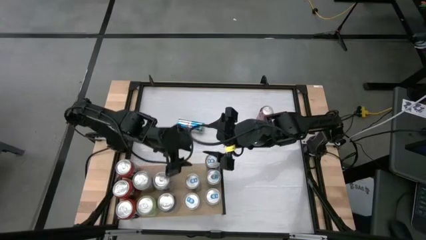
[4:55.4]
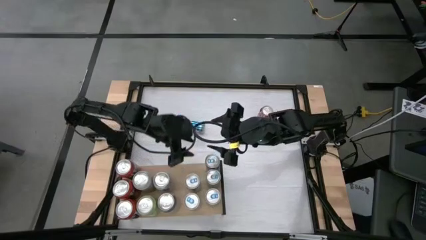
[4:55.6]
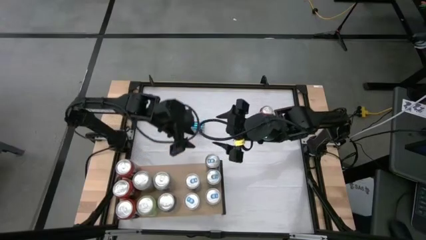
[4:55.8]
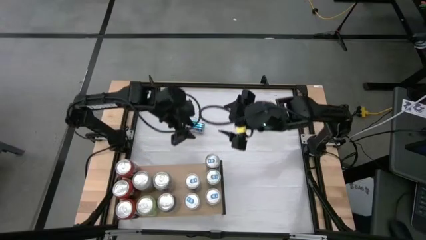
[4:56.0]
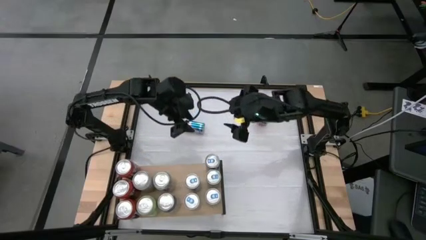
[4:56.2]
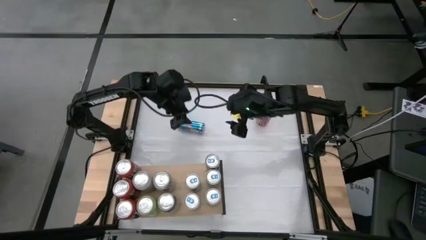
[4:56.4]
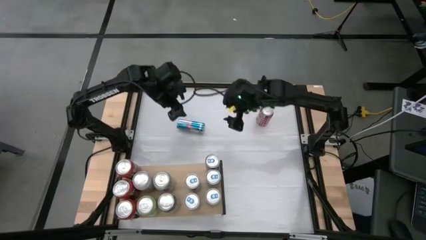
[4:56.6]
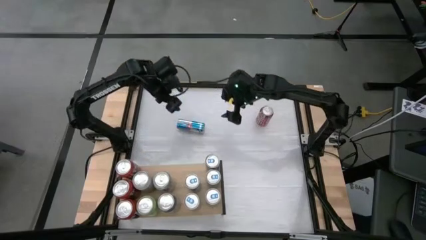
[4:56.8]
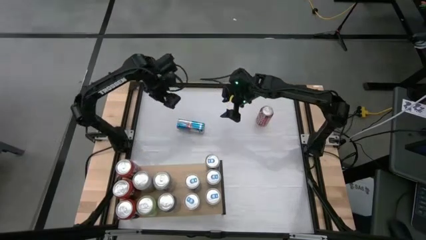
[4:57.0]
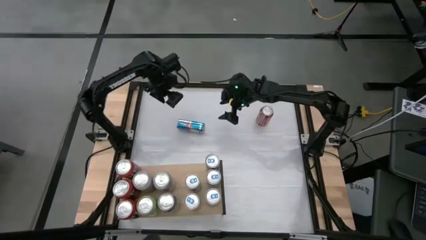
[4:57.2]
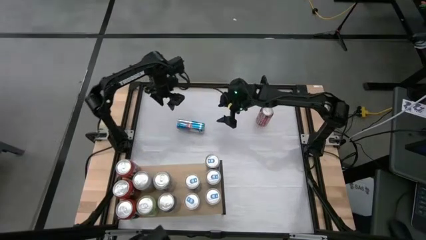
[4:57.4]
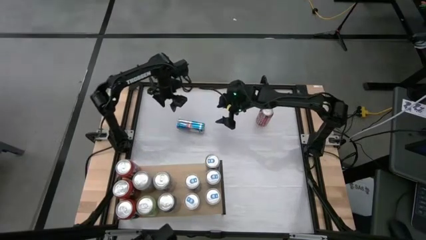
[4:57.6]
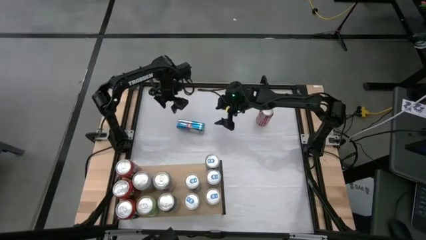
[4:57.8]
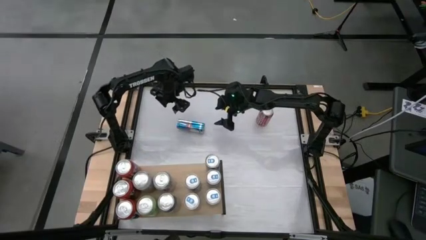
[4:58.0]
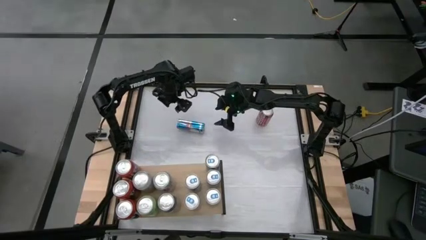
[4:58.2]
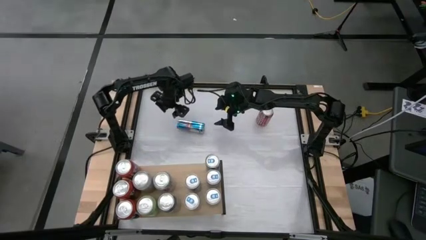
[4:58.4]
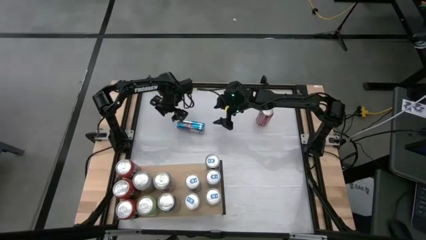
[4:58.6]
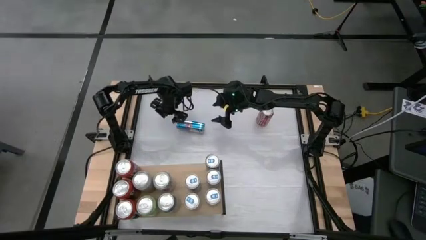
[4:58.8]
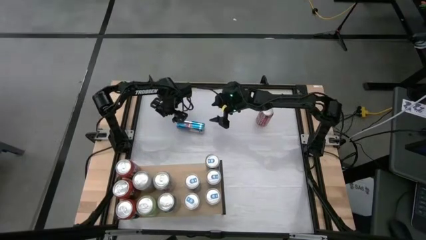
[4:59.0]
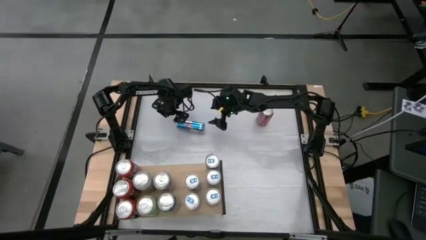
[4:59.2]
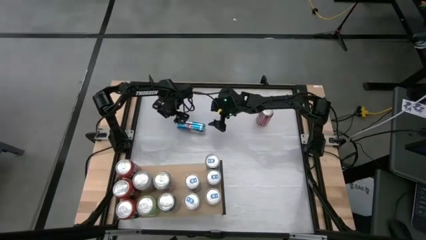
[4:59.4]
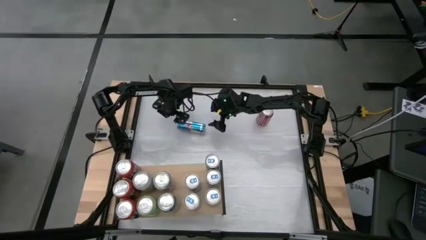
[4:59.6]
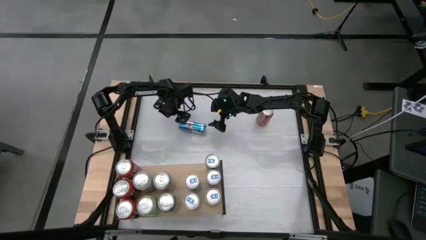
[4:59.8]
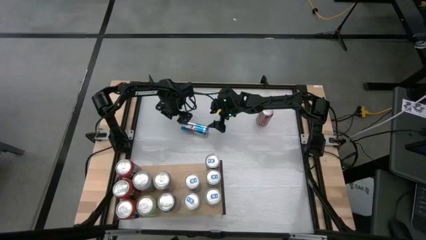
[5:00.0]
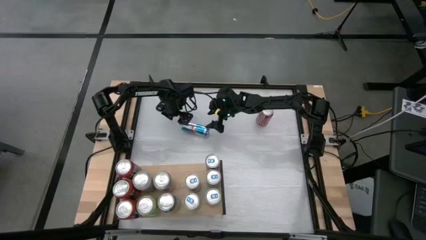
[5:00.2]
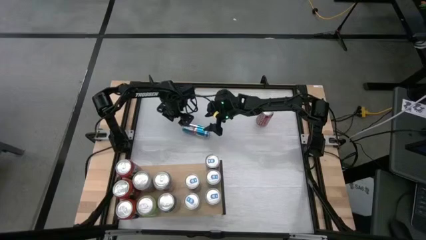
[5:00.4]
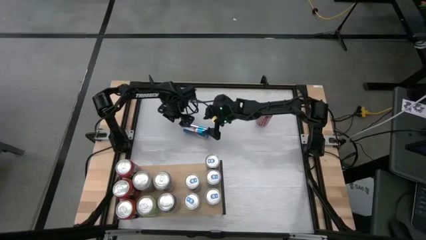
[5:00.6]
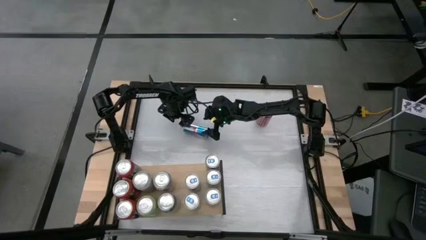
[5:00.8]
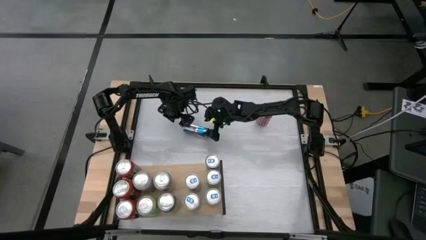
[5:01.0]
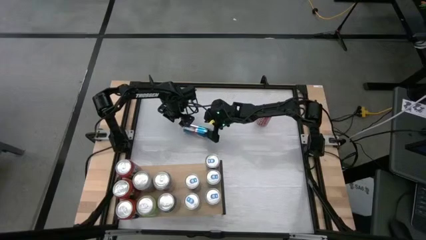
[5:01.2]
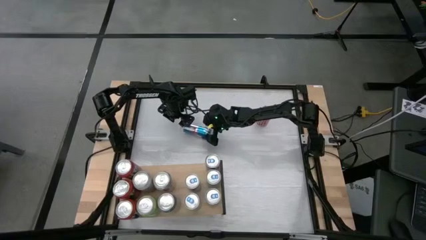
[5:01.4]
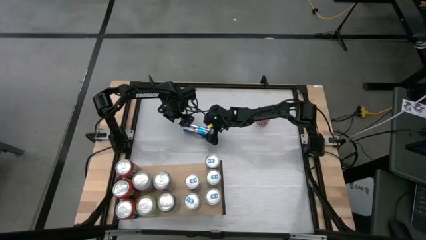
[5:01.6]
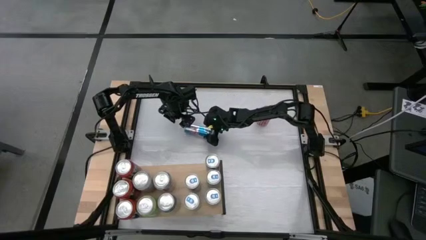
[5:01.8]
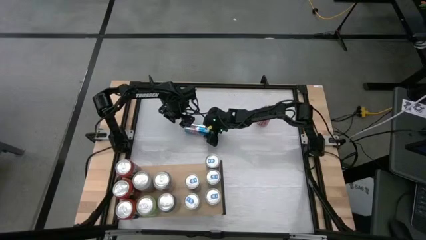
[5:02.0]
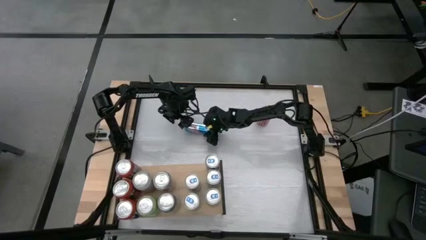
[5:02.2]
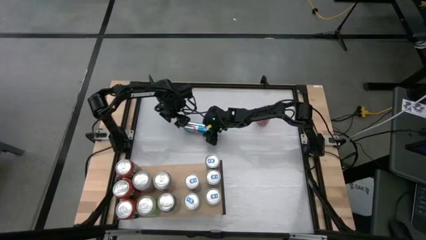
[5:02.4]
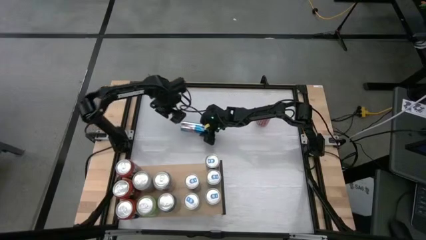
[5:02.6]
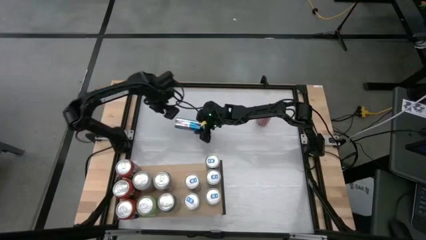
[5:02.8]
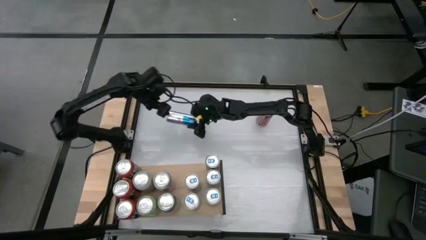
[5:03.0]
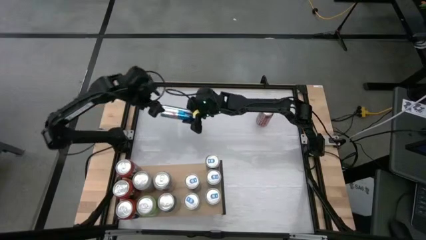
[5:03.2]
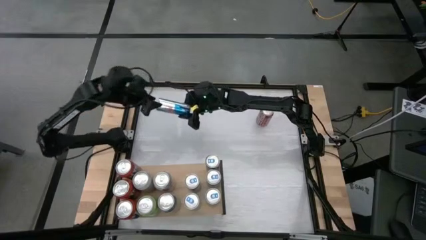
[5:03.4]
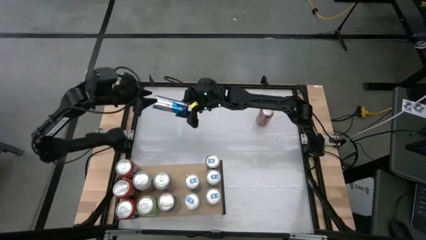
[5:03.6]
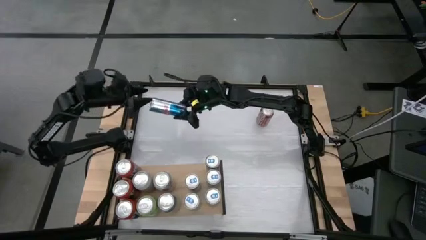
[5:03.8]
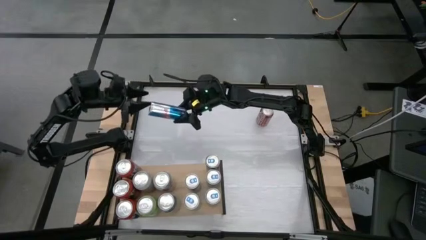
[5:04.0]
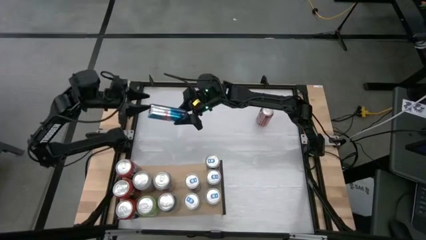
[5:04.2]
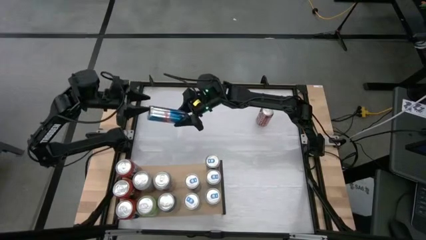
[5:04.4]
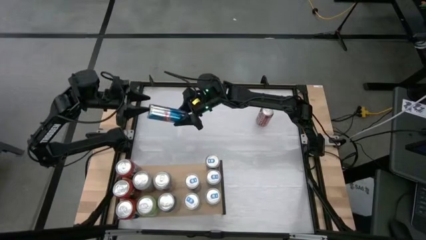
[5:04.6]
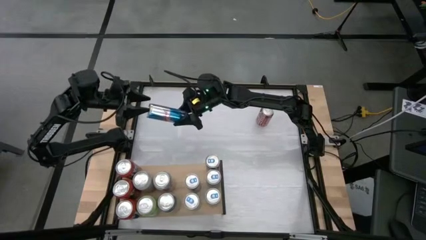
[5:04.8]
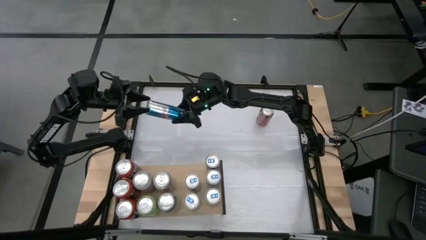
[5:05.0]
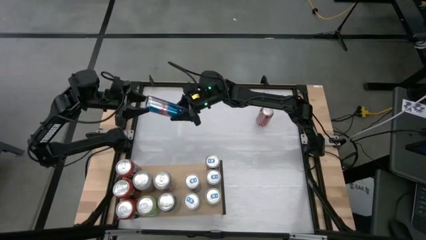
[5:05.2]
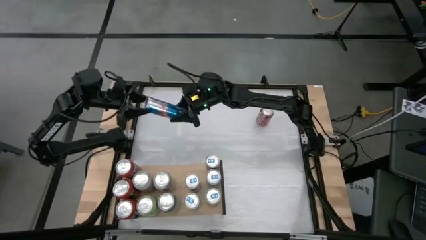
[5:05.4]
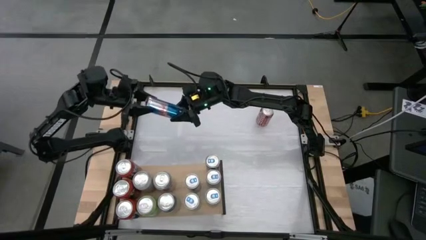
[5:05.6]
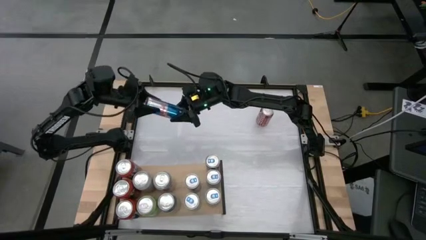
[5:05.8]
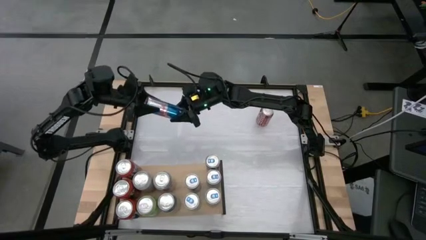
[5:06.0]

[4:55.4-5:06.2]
Task: Place canned beverage on shelf
Put the blue soda can on the shelf aligned with the other blue soda cans

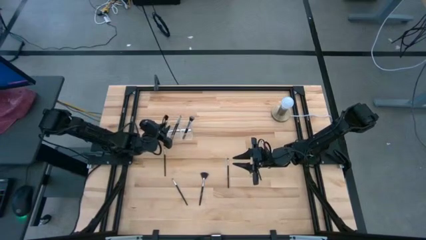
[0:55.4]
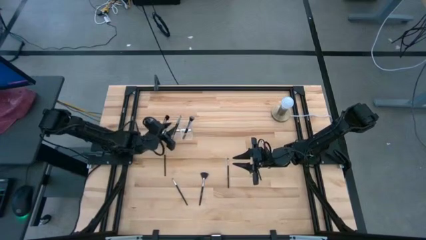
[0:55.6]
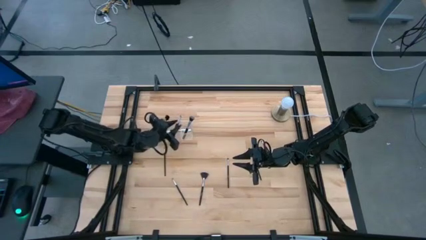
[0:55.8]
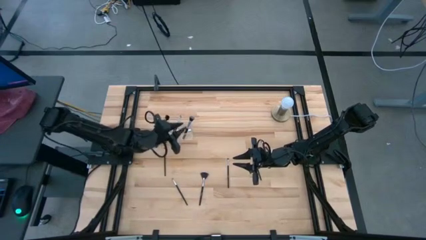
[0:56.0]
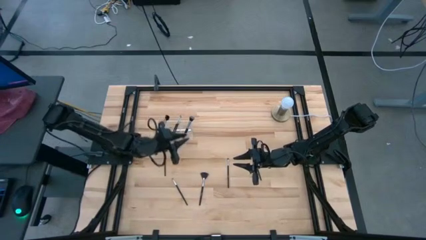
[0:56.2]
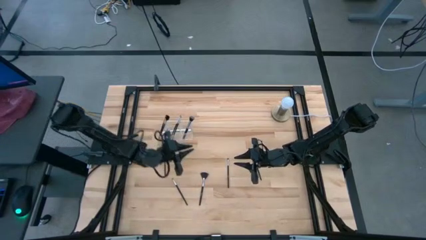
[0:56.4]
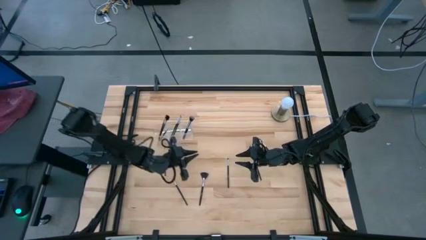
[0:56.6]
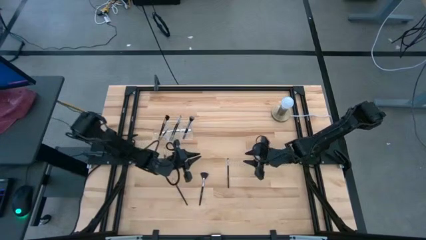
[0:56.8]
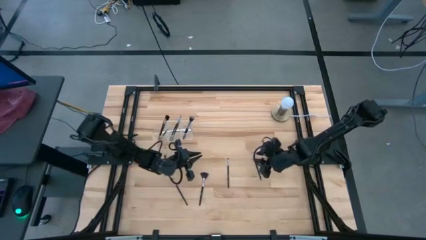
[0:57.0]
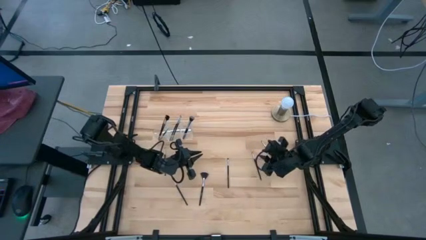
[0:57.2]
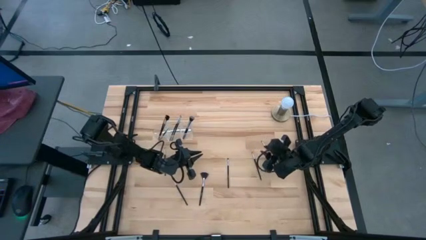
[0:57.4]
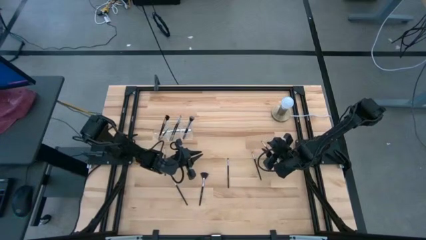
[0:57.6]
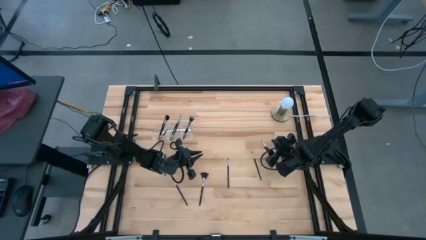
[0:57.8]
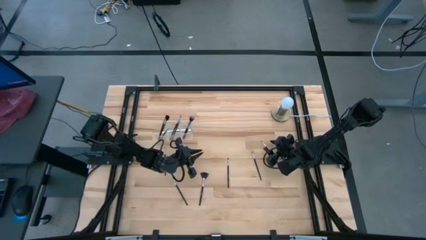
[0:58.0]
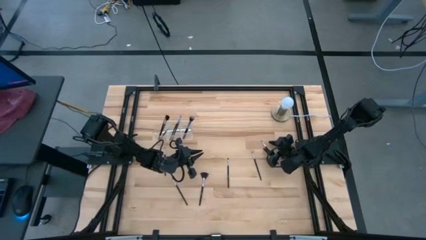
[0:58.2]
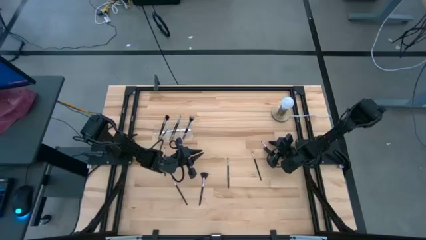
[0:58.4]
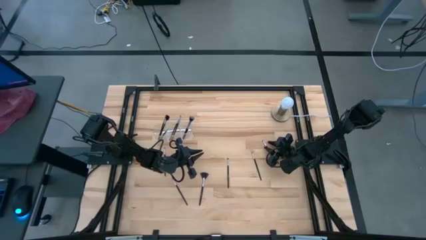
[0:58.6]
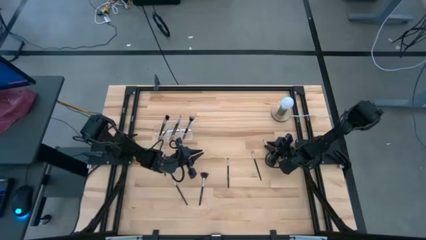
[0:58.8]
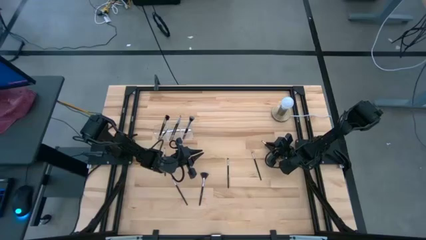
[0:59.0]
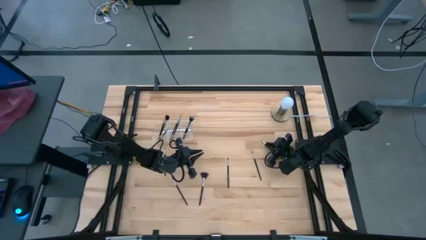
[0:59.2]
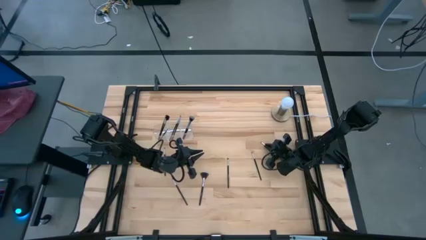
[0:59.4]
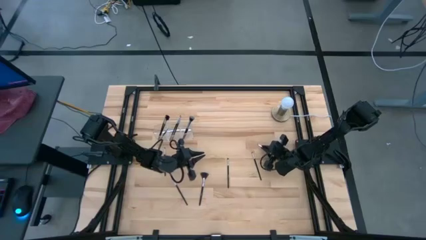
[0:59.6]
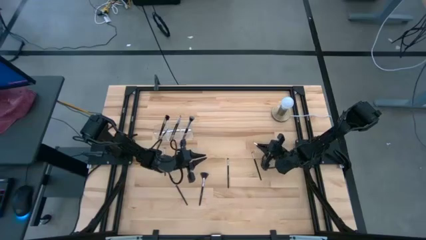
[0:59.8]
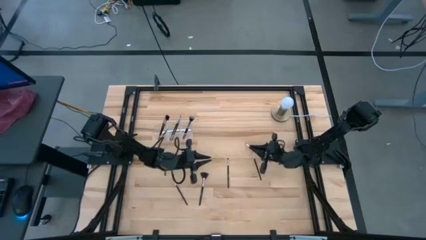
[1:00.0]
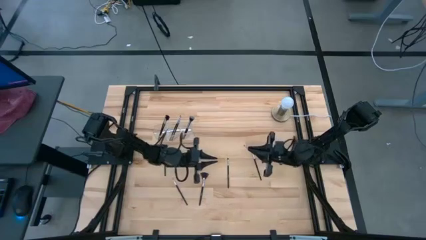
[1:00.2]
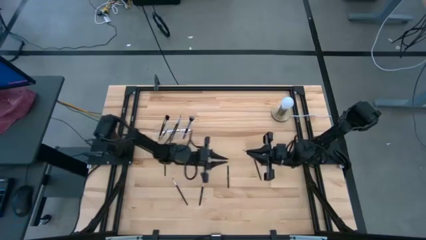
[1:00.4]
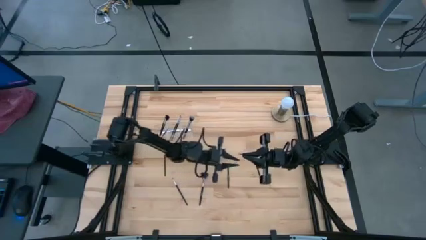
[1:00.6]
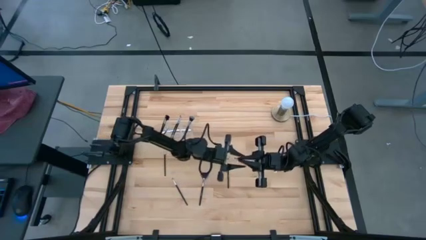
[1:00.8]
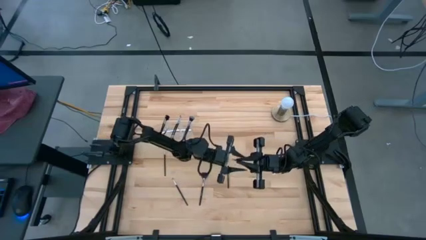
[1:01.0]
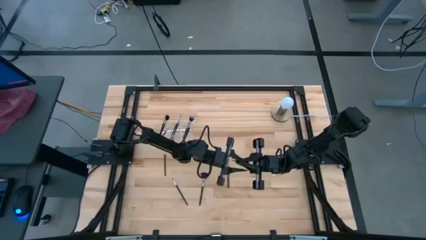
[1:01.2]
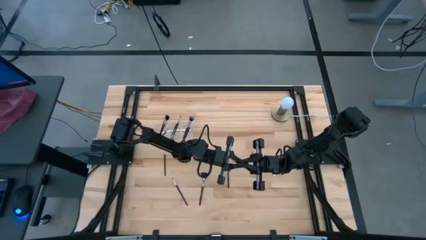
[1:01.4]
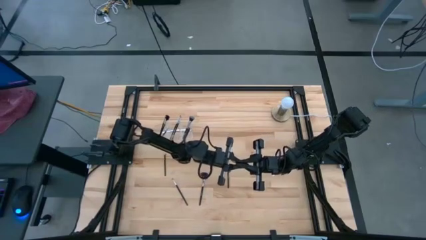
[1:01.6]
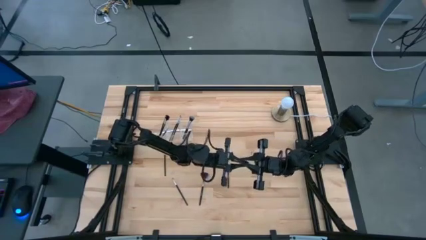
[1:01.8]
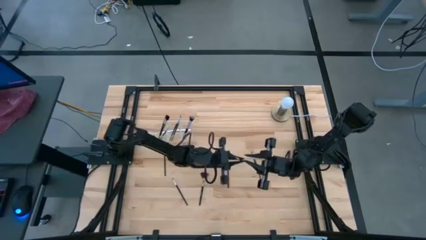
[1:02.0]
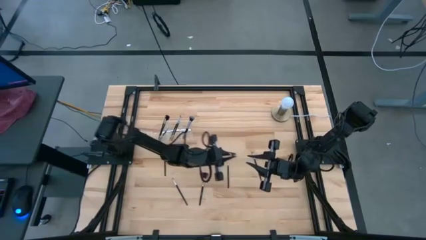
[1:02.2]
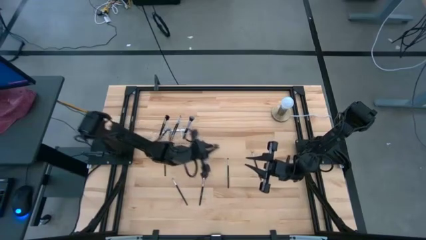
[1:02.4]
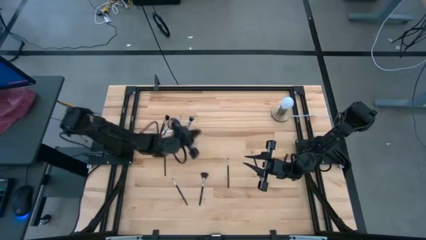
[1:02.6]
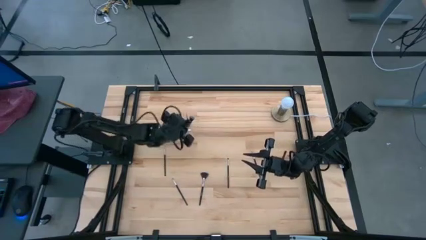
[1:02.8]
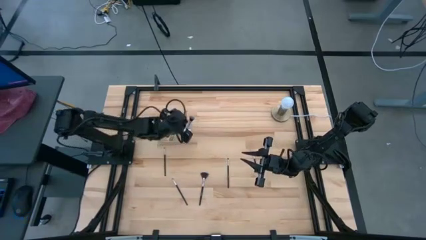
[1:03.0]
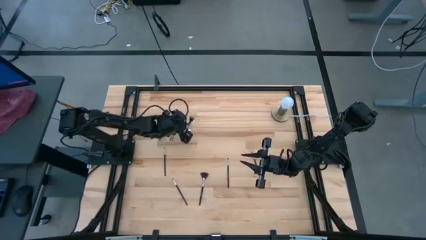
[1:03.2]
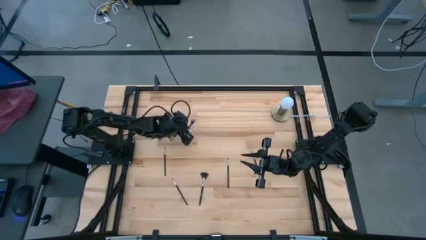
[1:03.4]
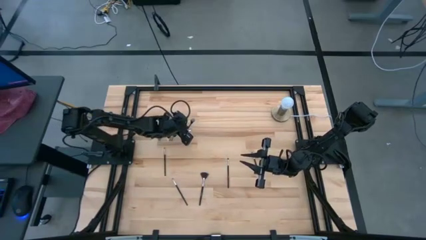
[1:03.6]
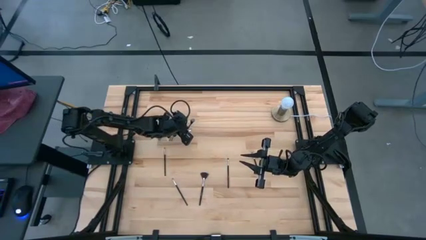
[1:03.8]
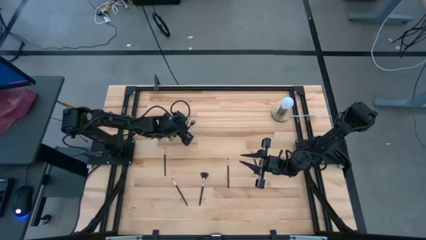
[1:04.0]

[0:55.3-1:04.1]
Task: Pick & Place Makeup Brushes
Put the black eyeshadow brush into the transparent organizer
